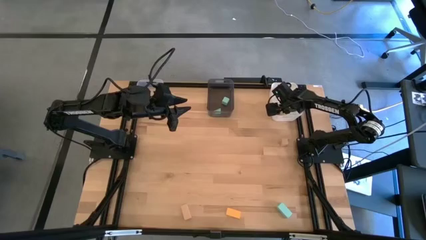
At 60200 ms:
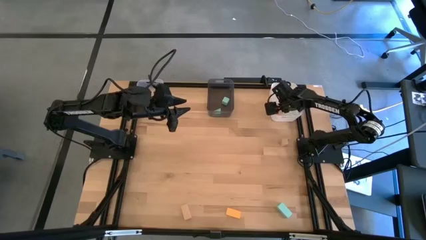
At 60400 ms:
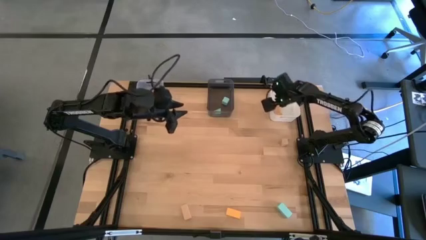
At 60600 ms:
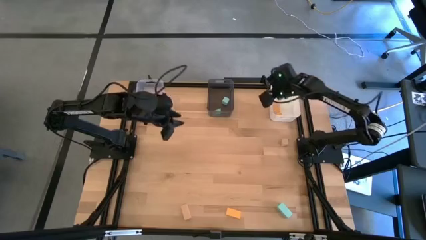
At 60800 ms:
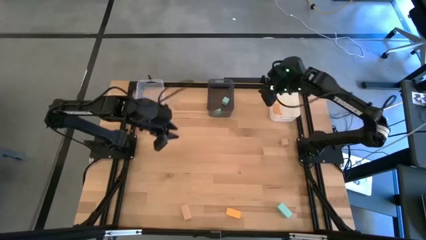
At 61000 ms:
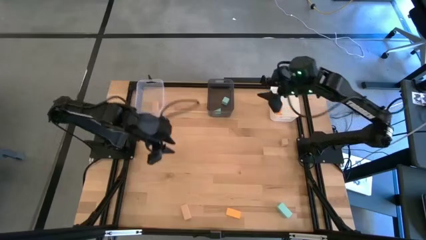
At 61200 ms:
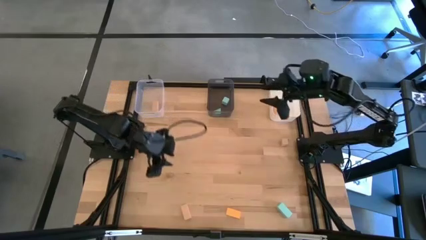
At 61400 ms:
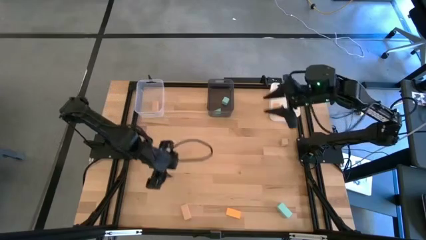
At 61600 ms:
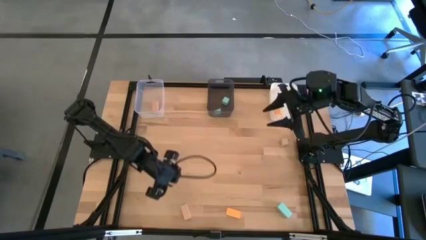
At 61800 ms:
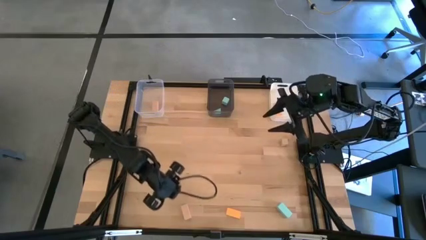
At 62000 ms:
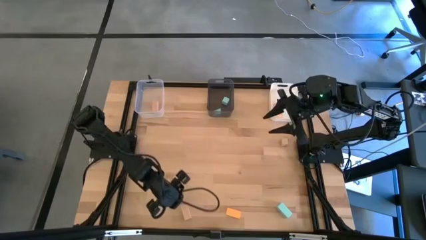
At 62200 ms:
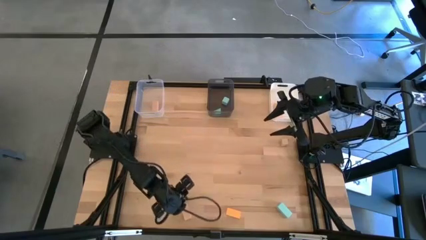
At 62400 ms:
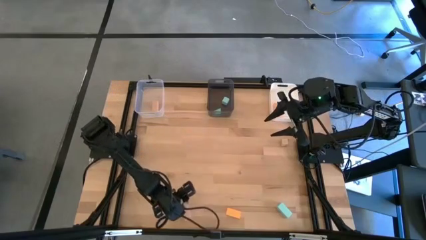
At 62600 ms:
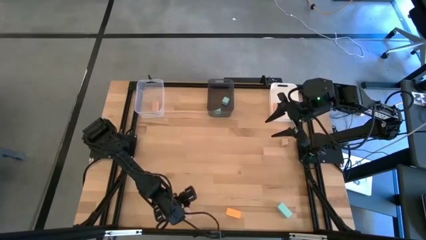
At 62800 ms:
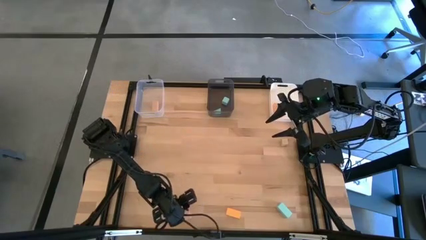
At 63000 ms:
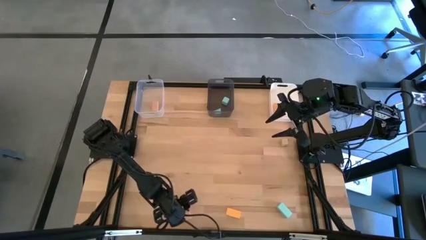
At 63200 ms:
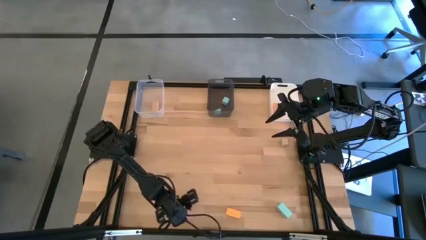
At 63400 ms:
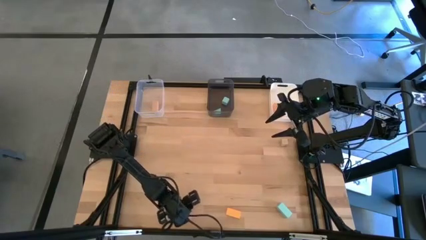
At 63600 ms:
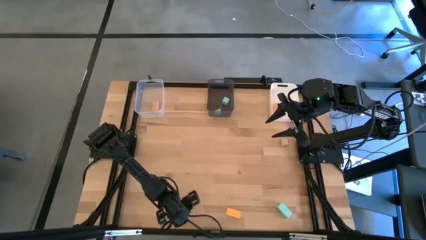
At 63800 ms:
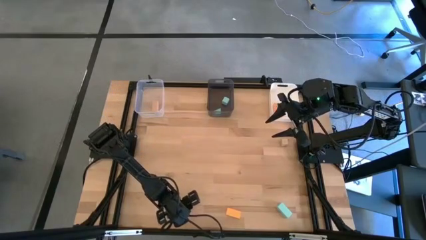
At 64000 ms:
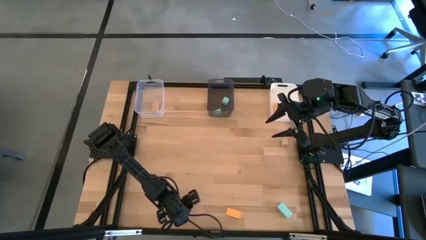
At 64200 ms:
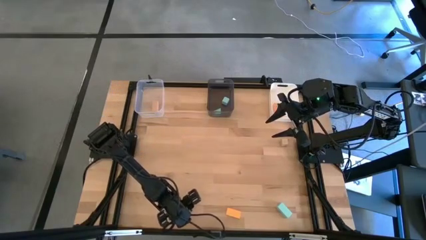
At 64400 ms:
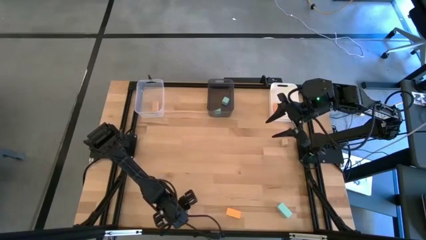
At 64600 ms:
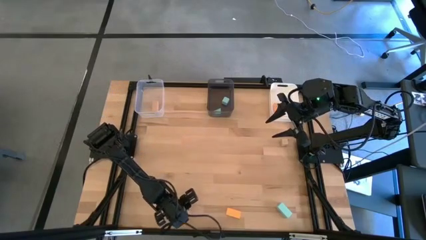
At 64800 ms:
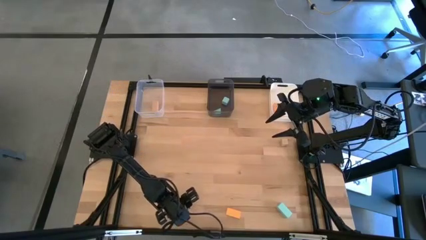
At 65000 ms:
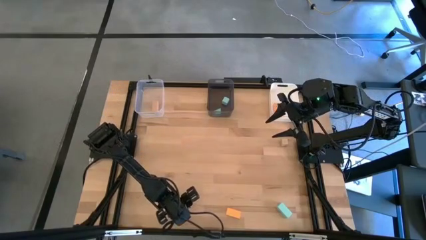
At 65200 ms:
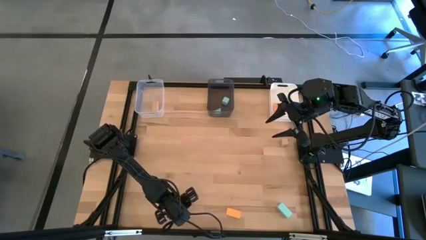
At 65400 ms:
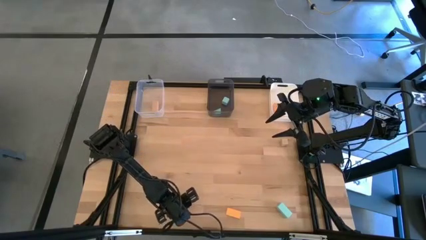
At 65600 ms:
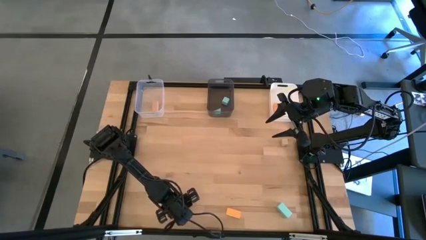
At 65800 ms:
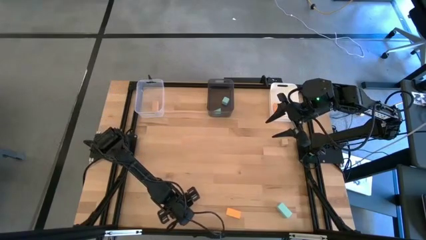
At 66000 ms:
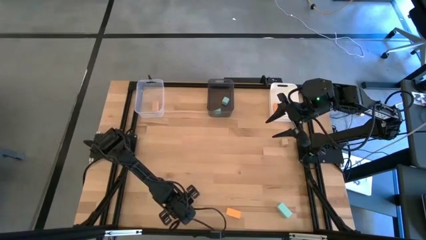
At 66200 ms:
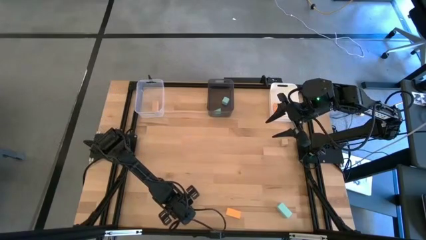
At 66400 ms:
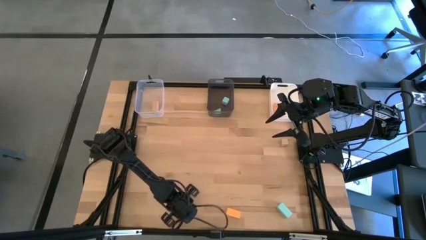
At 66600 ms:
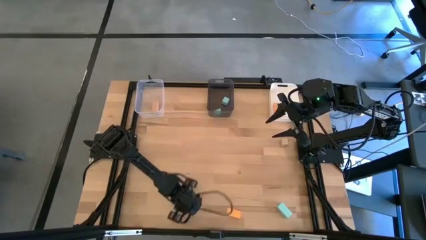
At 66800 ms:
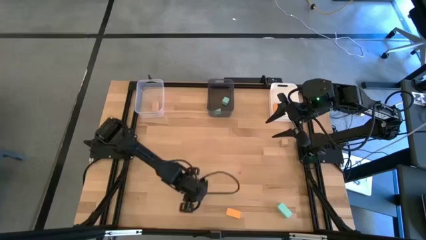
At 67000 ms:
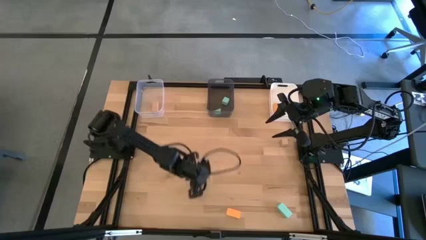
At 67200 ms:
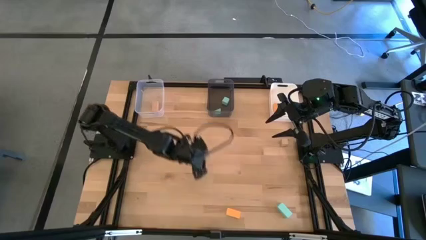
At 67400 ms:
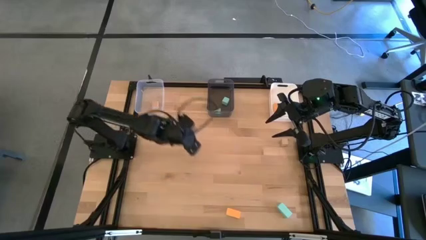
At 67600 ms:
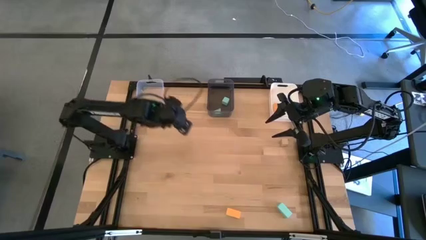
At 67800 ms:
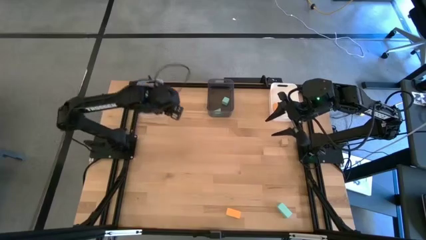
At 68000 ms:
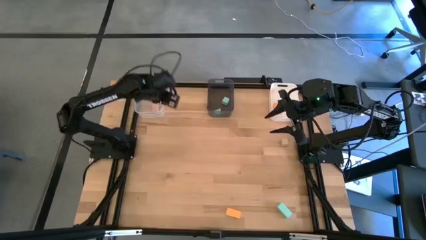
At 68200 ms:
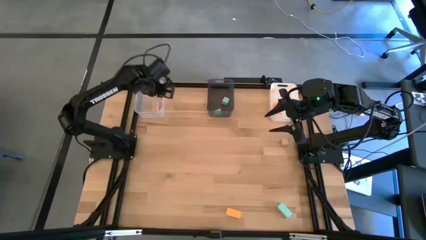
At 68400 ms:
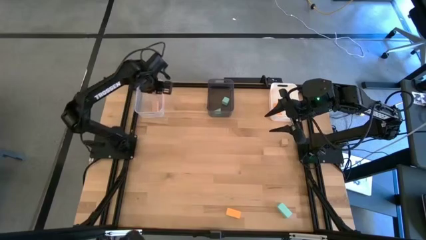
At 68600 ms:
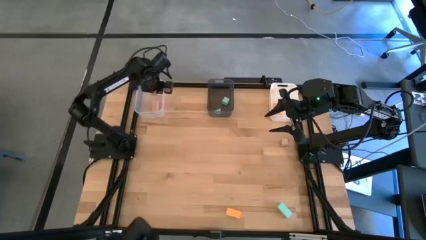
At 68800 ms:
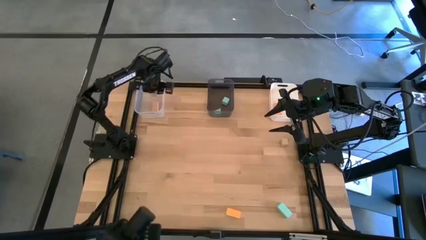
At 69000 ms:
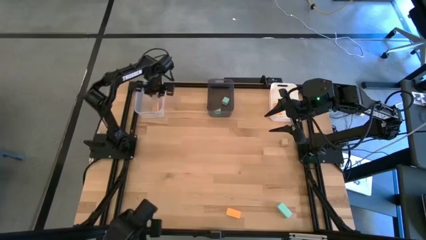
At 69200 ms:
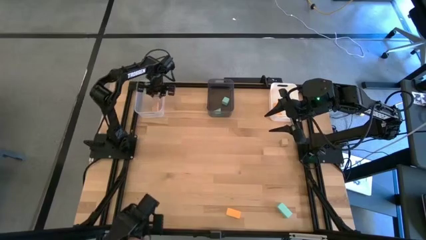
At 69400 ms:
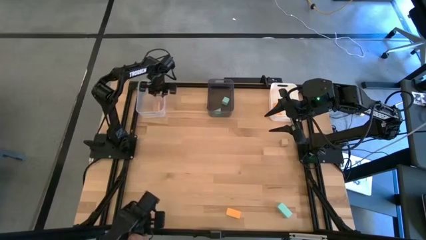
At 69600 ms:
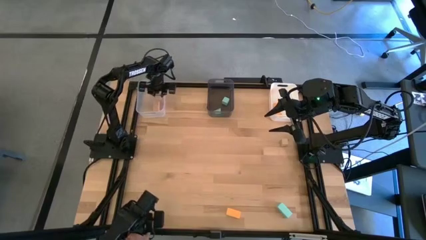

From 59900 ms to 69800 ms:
Task: Sort & place blocks by color
Put the bottom light brown block into the transparent bin
